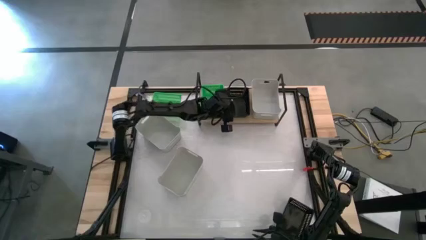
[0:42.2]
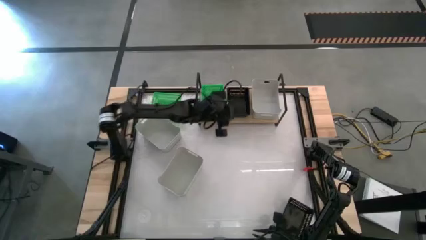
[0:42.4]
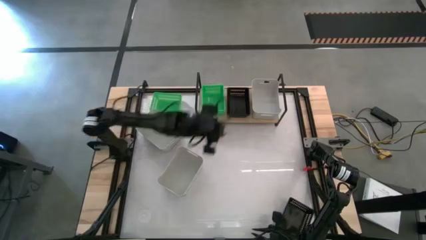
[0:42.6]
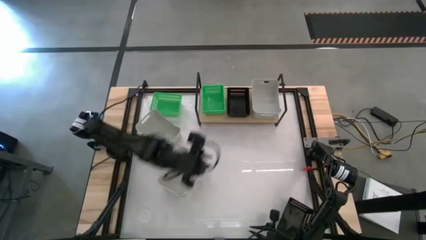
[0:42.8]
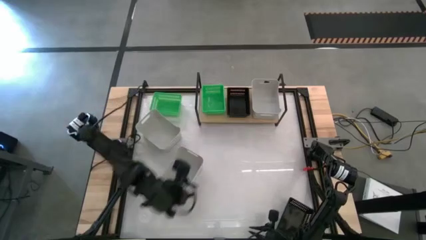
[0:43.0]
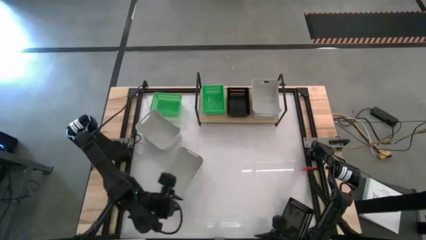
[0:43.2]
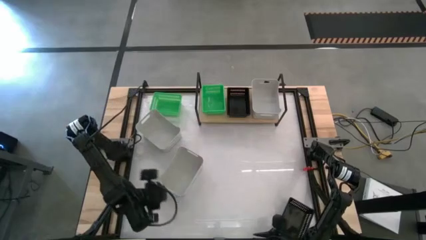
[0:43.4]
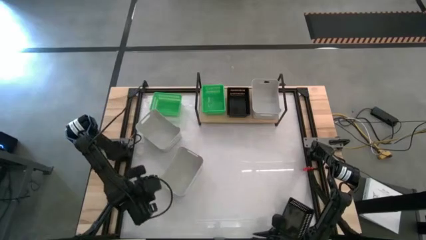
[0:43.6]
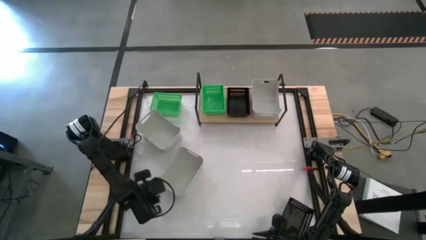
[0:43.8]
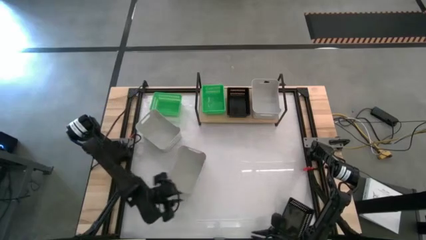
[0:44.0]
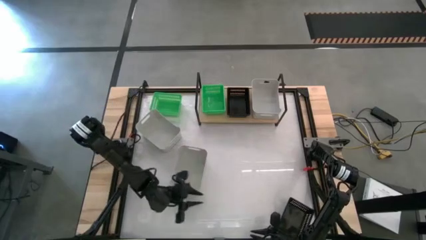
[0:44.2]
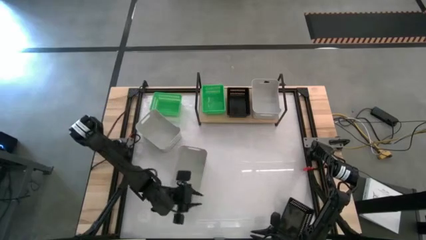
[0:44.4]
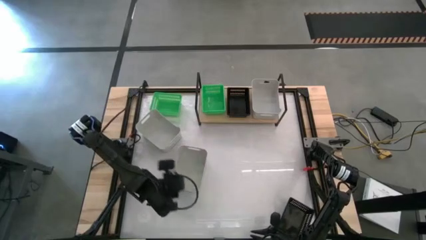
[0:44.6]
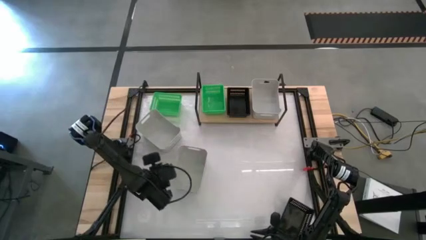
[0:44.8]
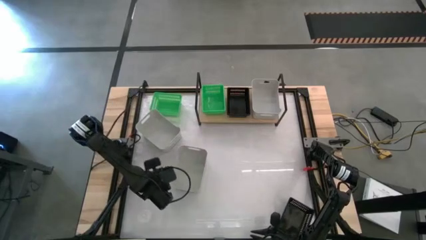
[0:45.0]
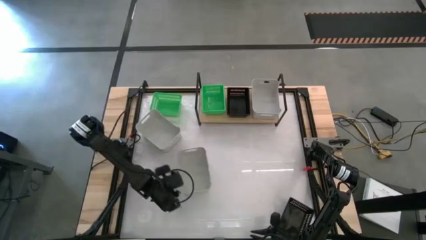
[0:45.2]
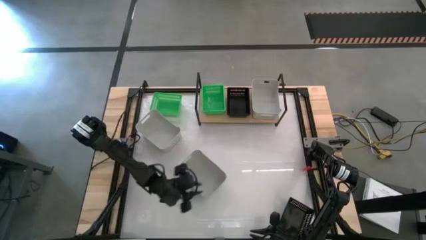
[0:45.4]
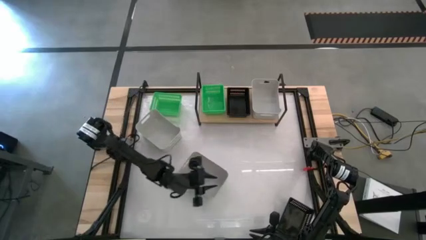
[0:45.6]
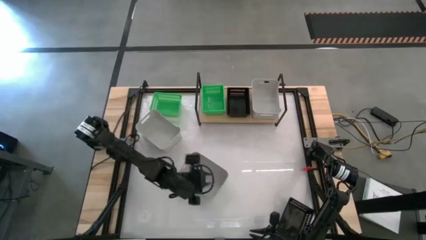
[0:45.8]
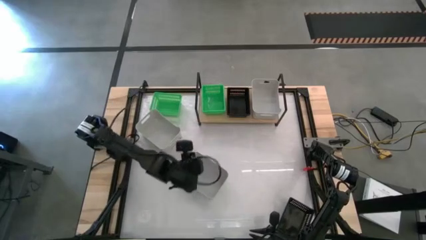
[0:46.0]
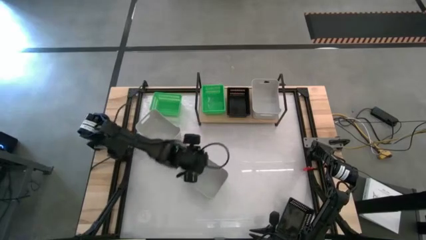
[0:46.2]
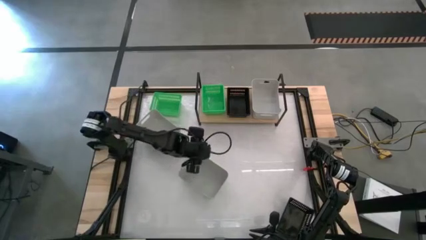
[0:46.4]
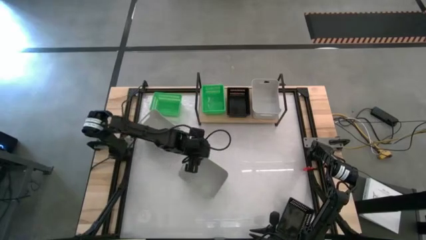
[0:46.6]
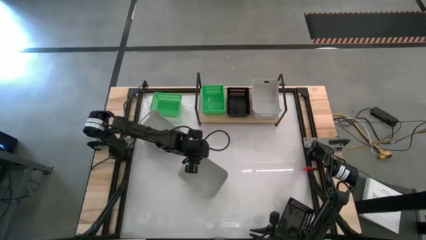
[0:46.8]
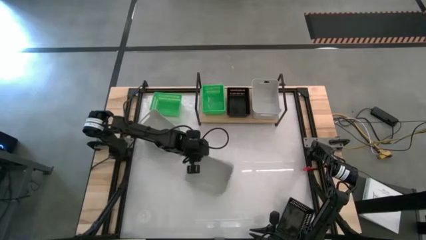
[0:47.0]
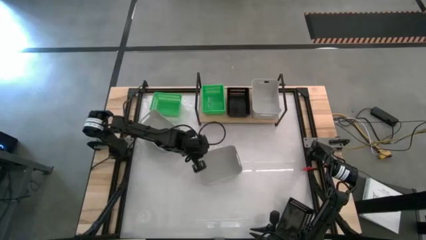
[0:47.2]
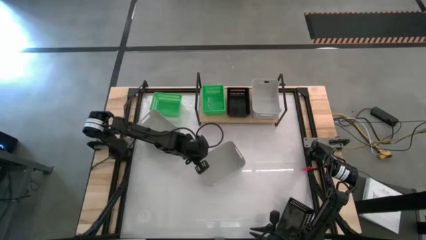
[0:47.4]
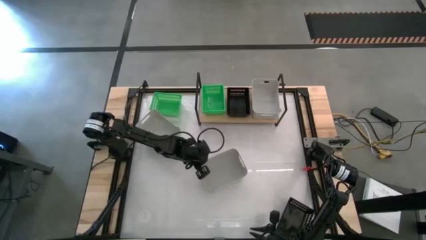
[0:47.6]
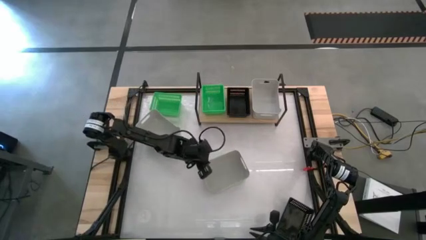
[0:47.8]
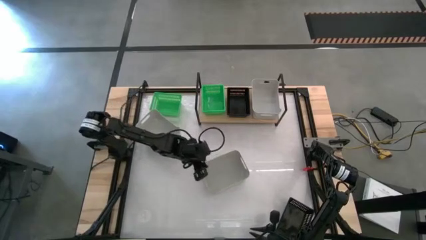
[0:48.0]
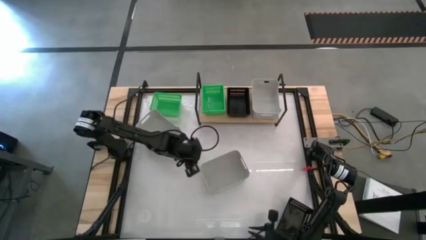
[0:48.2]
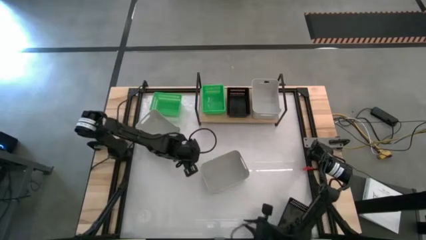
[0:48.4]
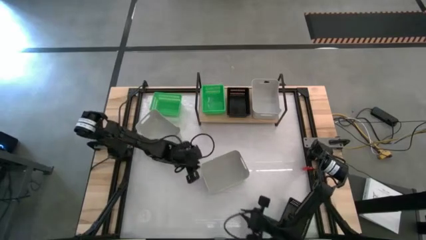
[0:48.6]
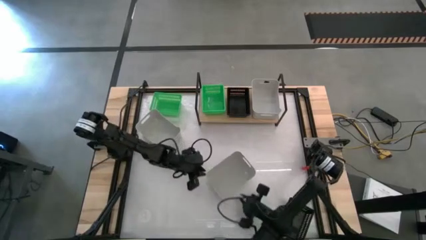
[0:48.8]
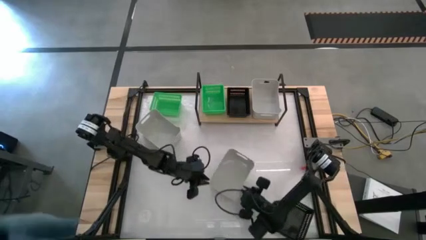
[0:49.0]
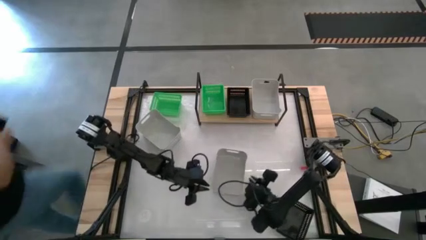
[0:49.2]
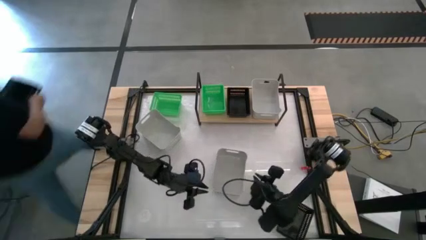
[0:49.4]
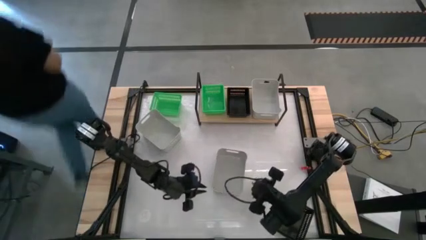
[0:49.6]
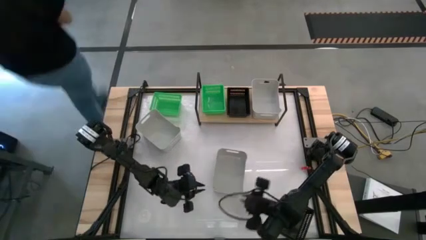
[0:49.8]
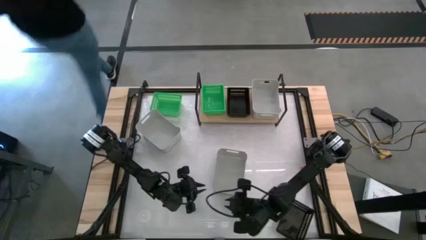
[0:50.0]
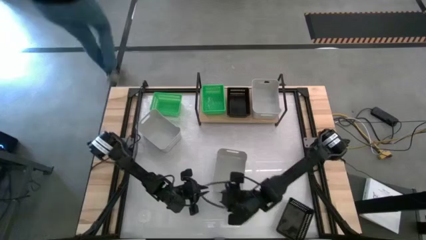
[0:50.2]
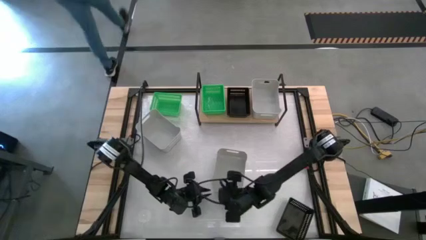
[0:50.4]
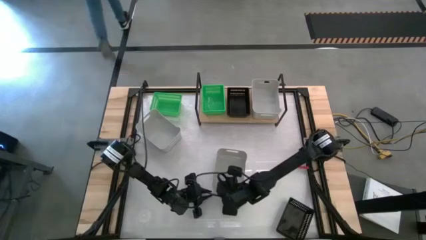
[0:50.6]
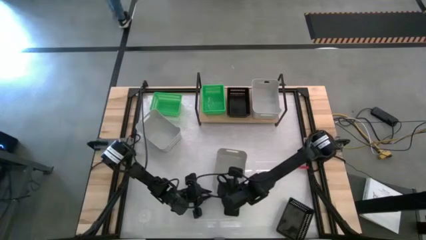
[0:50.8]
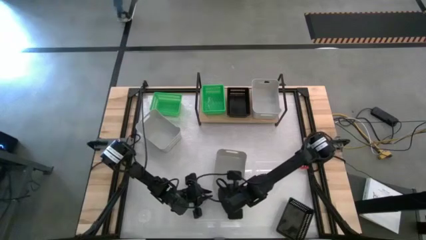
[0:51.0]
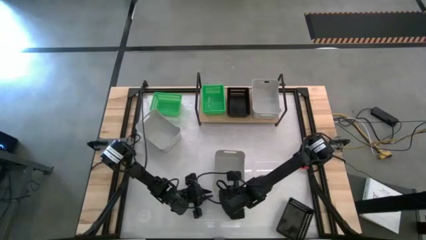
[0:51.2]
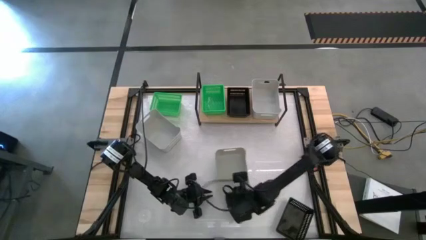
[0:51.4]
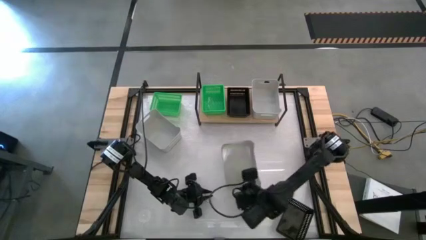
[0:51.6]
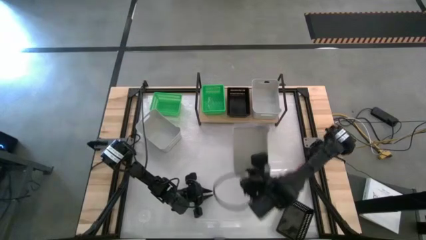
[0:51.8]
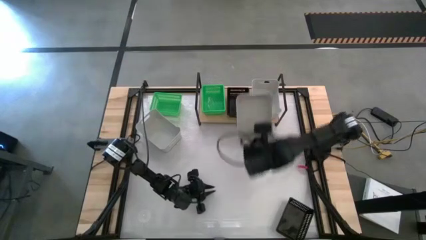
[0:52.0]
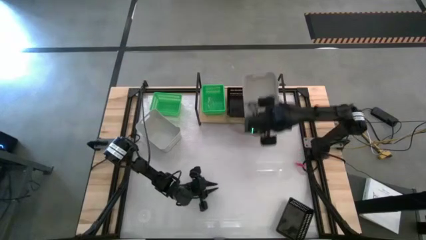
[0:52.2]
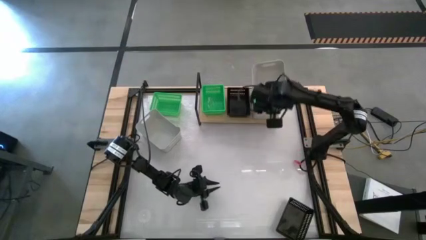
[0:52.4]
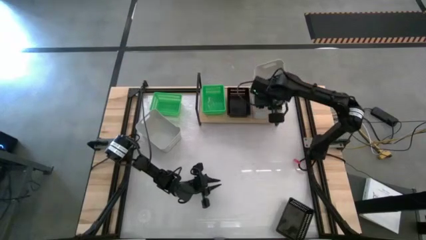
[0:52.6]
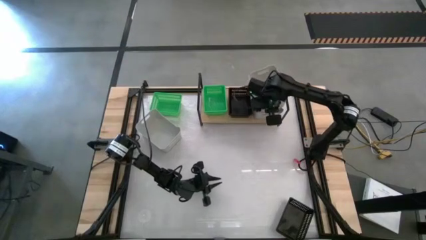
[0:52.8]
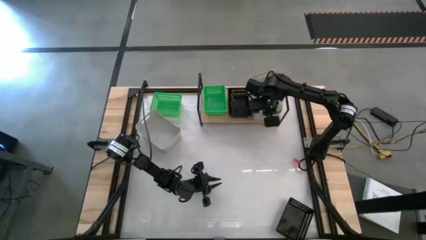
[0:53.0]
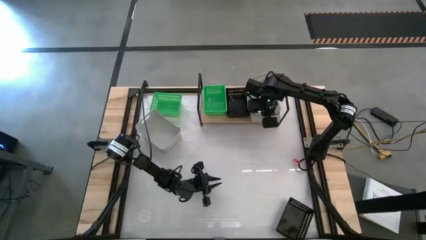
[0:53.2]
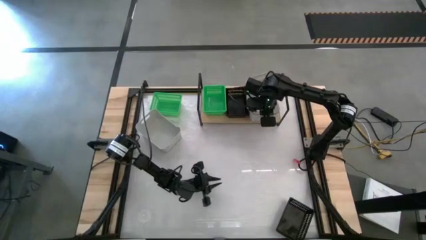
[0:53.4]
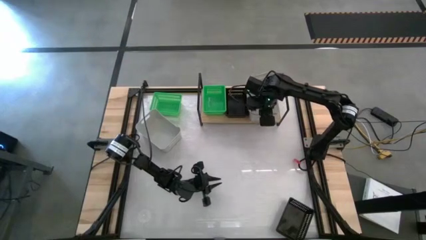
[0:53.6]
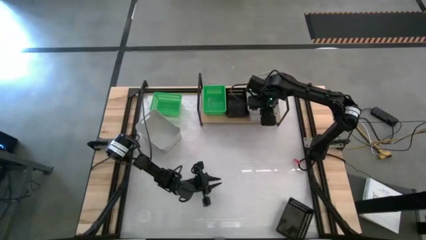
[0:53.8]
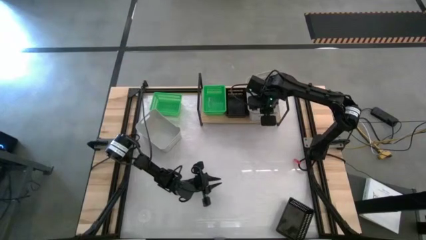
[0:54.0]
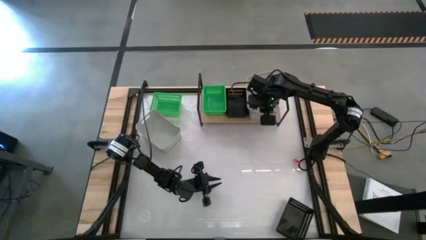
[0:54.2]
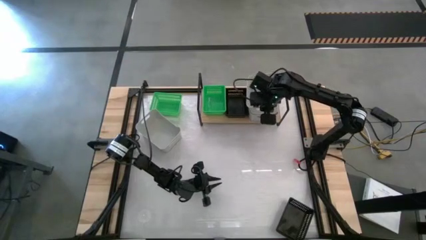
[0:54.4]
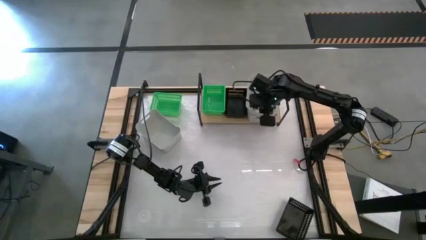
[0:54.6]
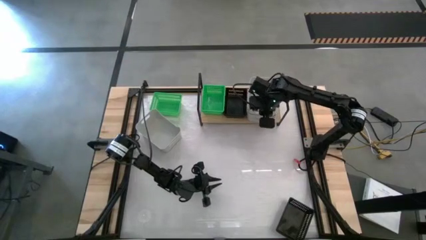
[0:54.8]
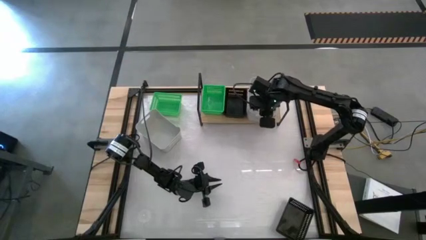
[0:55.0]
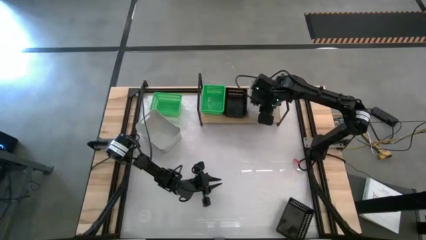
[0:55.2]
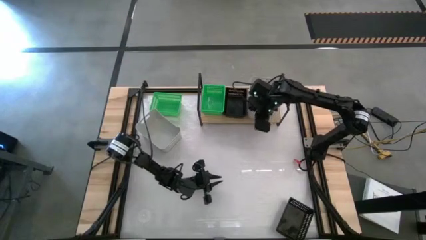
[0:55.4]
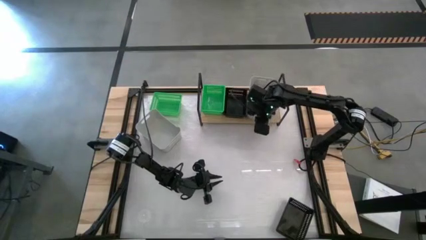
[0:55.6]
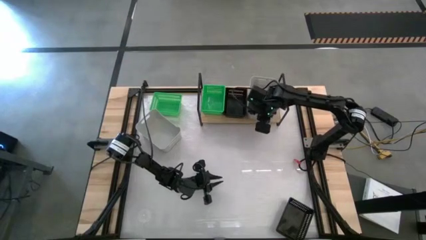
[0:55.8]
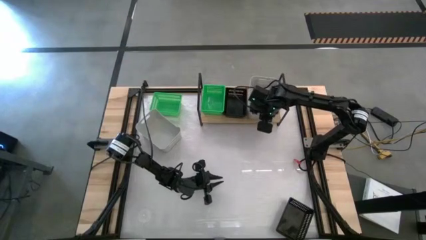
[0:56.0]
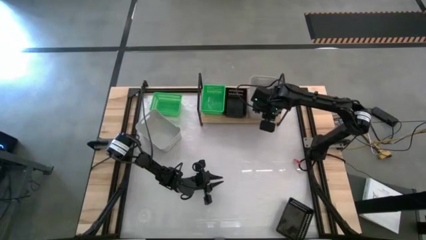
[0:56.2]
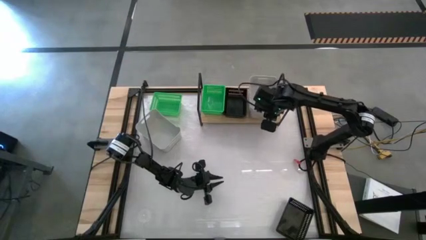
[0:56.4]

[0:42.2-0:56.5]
Task: Stack baskets on shelf by color
Stack the bottom gray bin on top of the other gray bin on the shelf

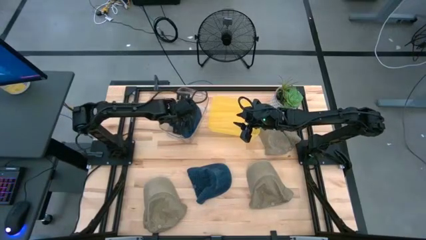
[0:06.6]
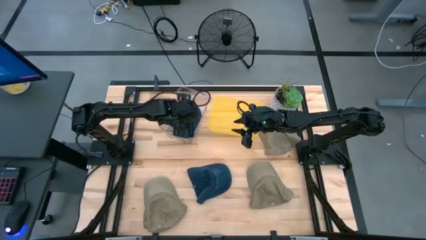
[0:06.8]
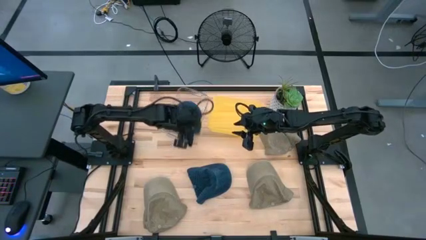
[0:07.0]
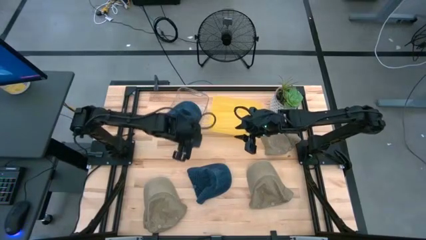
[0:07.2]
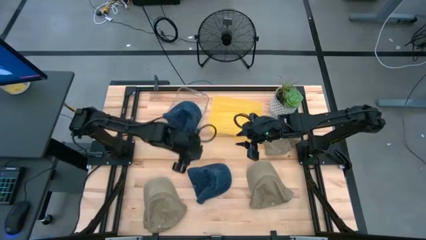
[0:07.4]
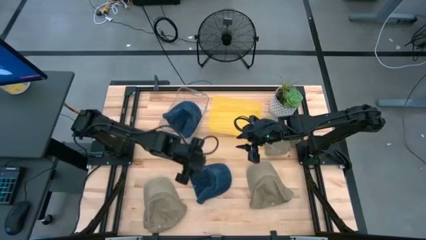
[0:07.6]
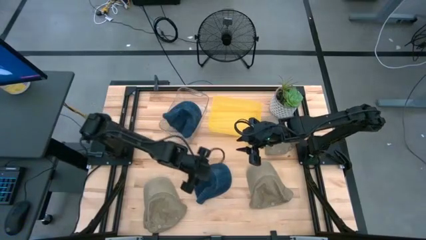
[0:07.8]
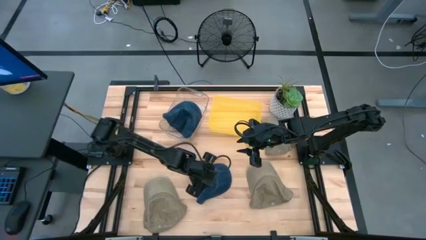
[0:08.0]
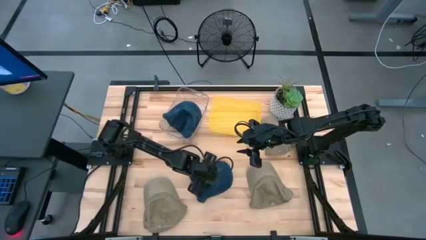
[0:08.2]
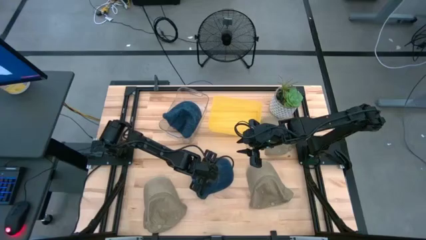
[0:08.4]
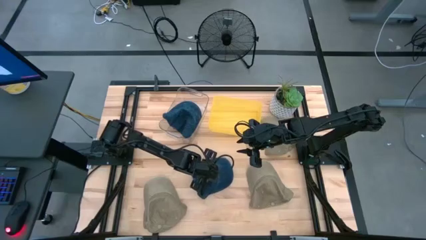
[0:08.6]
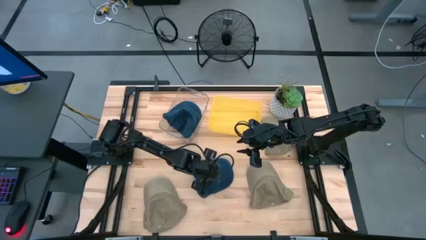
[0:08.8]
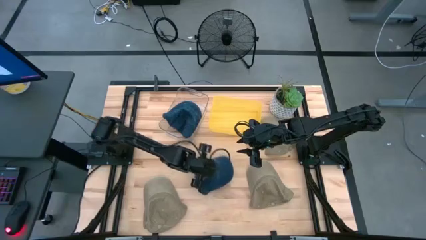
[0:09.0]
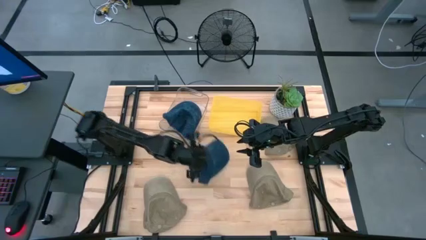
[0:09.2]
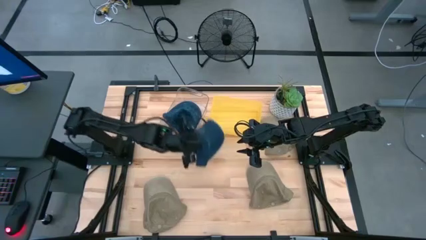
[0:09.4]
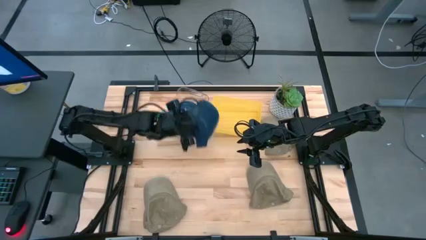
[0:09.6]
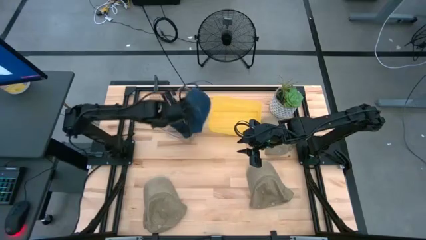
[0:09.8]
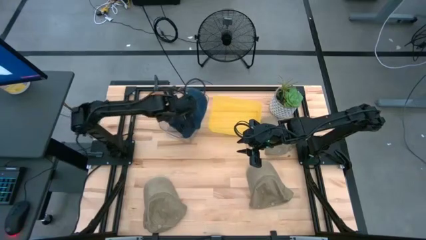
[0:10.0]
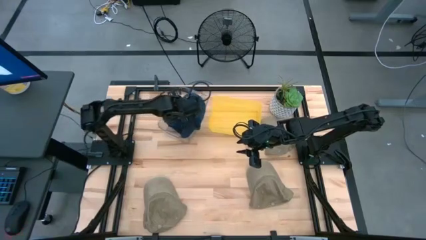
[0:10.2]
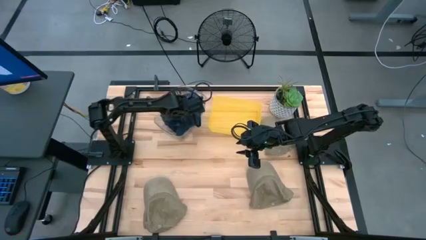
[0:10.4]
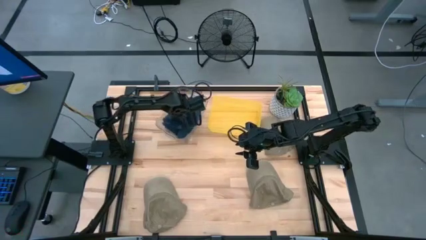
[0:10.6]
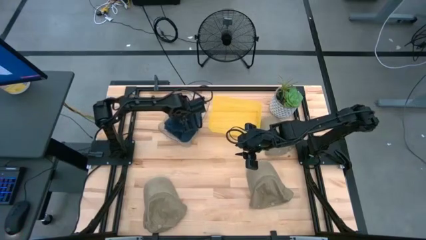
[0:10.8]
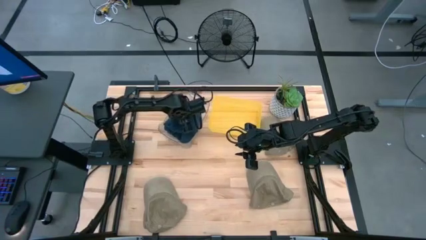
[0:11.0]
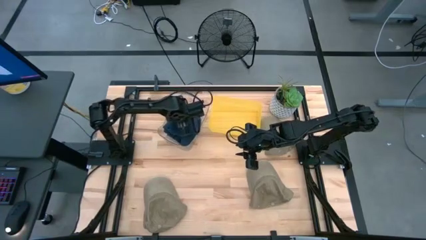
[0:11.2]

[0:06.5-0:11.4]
Task: Pick & Place hat
Put the blue cap into the transparent bin
